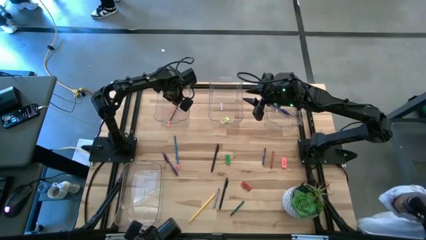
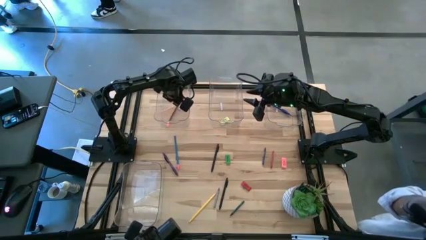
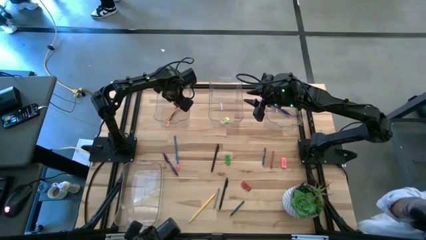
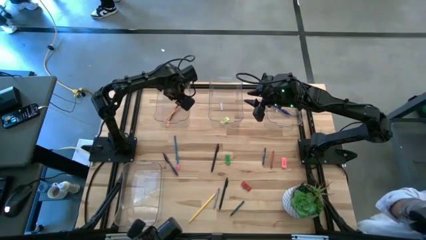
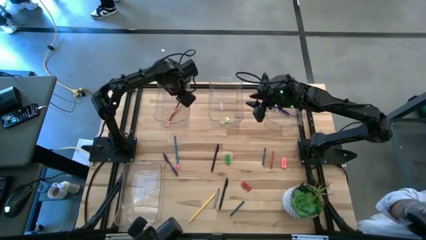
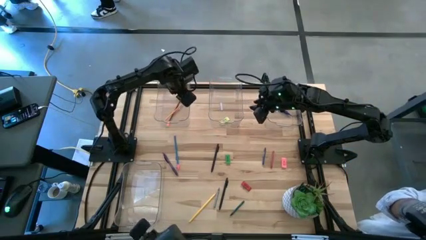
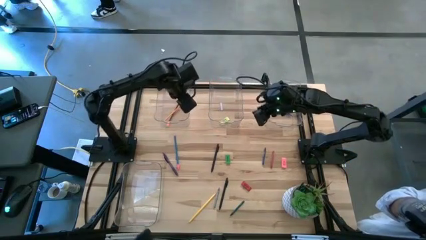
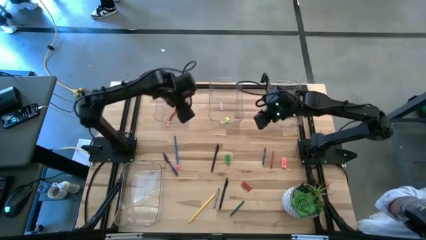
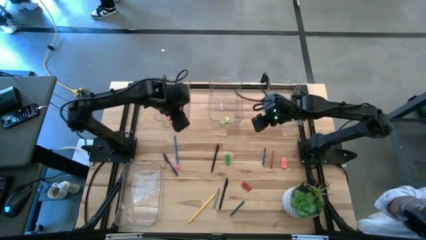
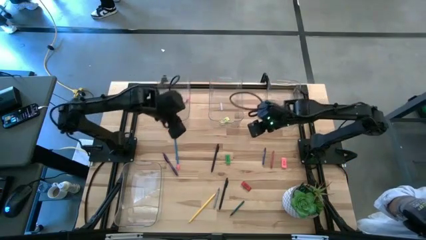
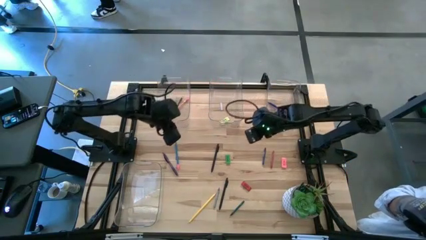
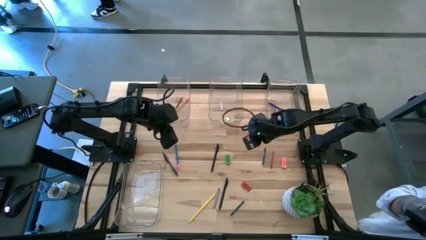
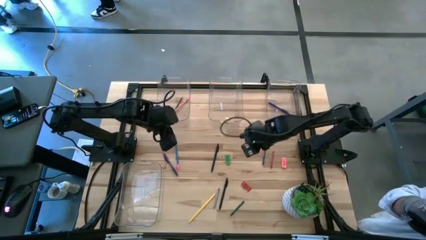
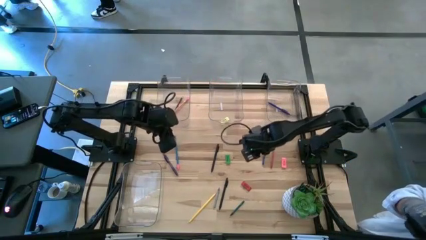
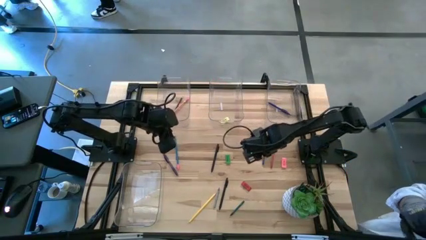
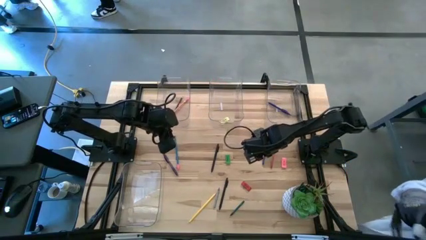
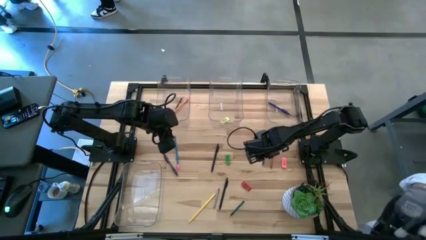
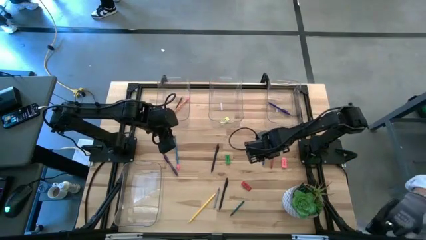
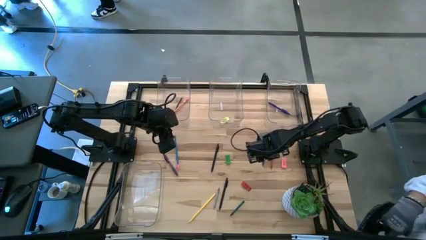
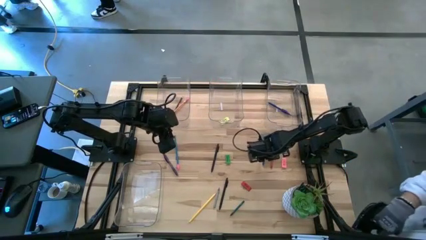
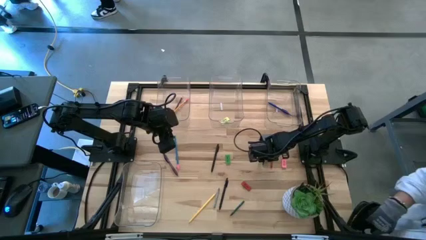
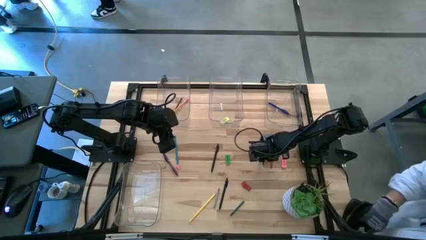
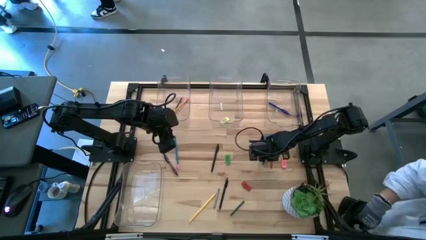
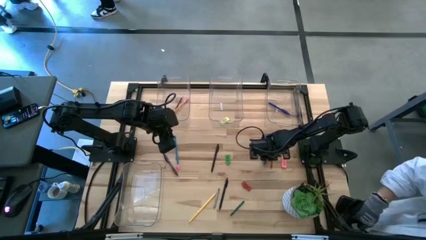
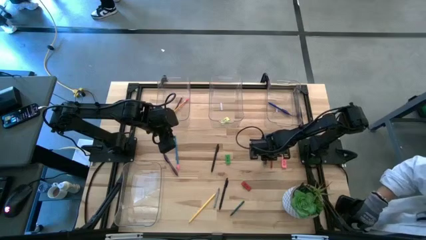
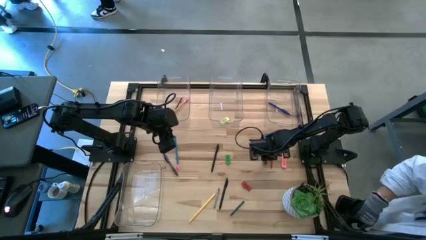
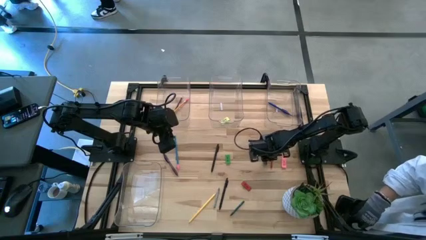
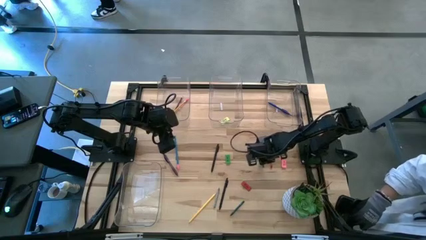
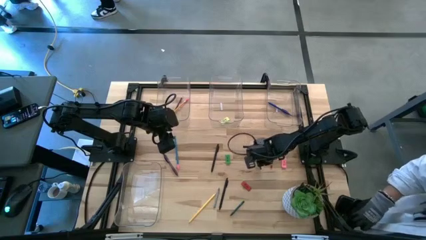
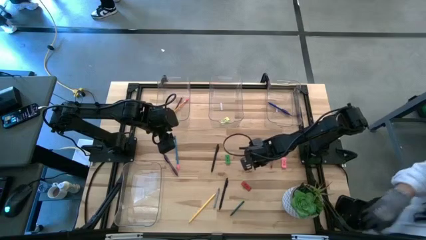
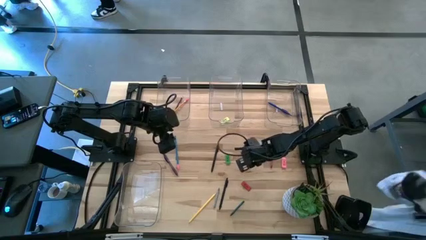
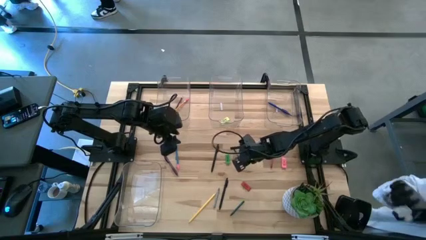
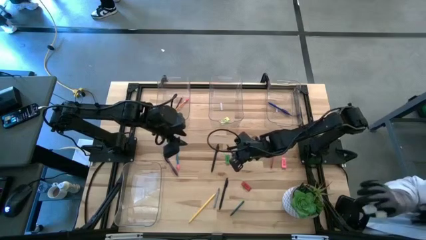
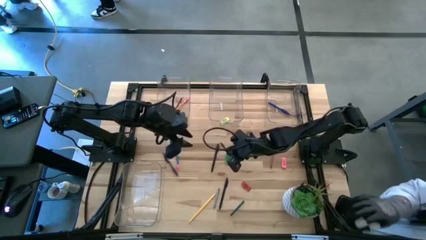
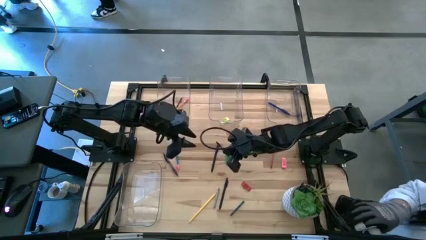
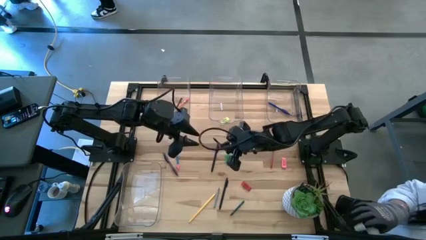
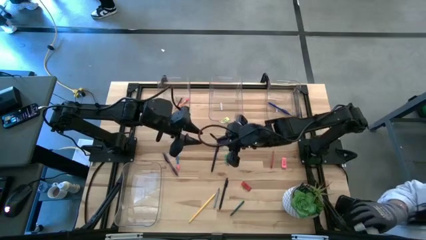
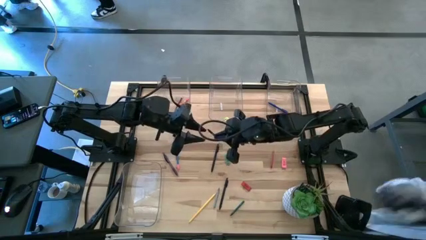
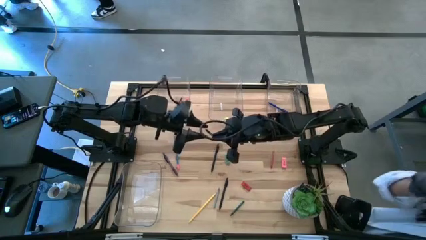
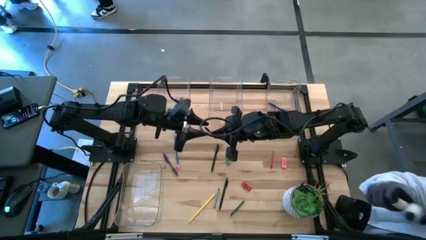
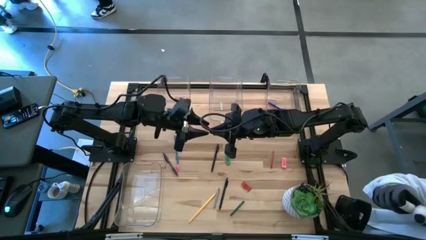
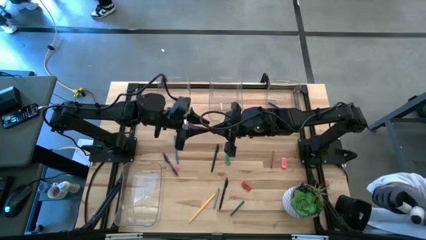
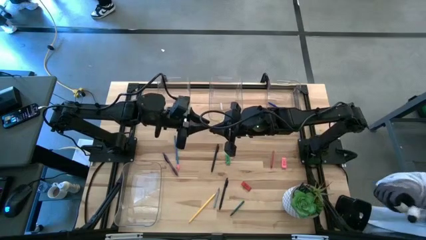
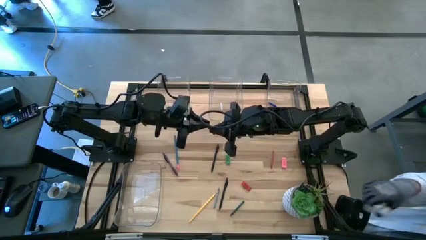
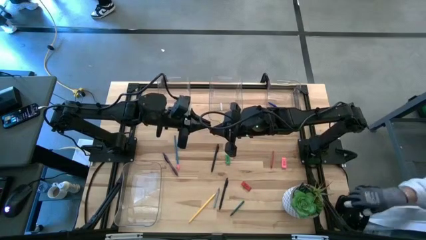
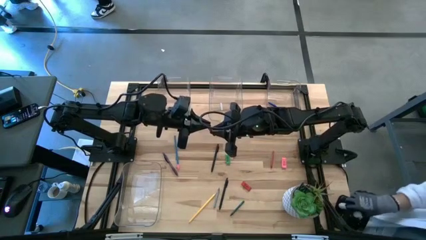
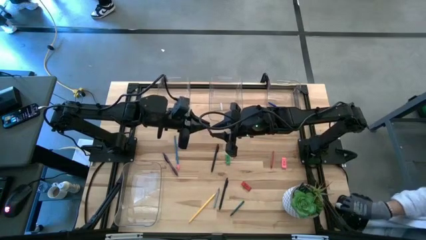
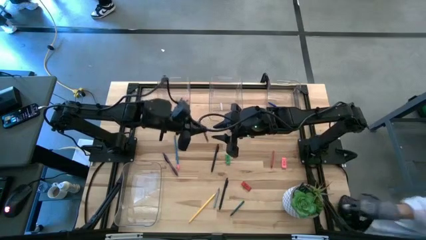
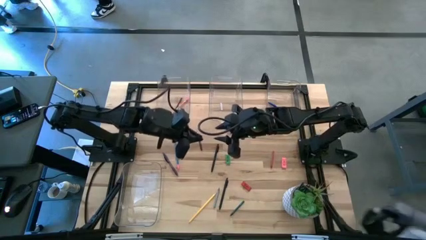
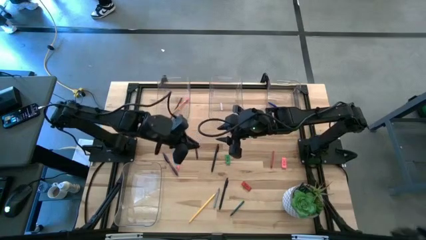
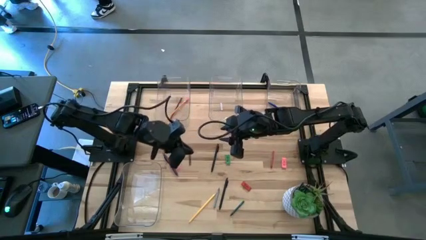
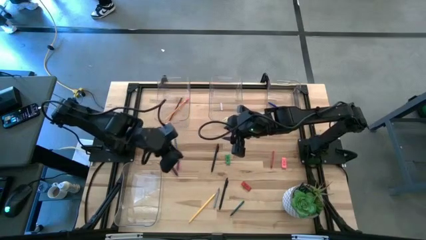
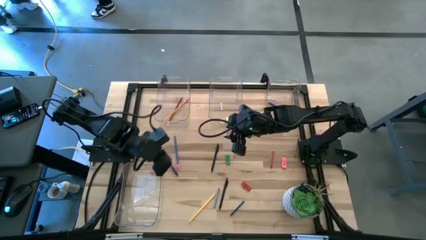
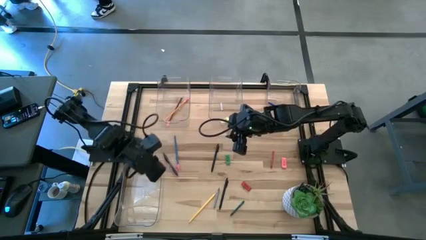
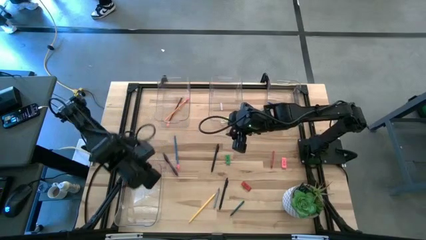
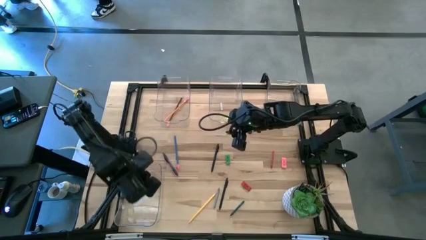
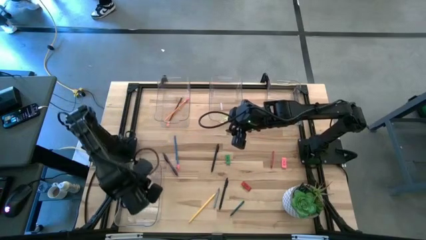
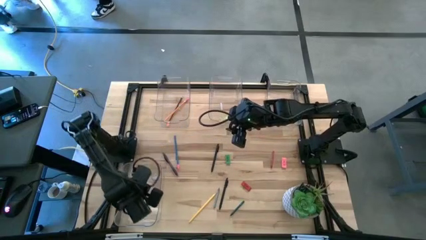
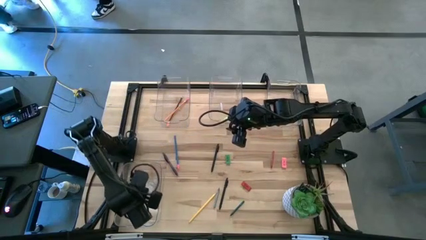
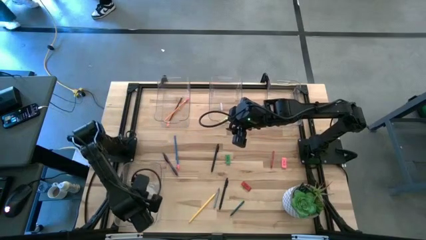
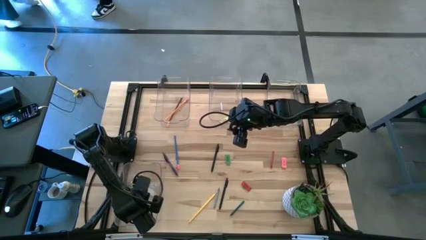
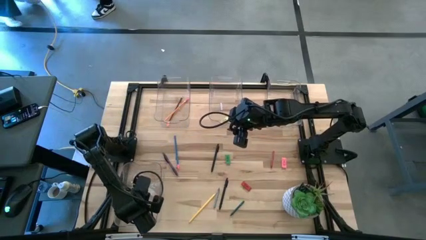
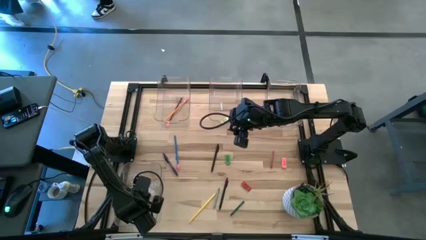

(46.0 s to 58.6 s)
Task: Sort crayons/erasers/pens/pencils in bins
Put the blue crayon into the bottom transparent bin

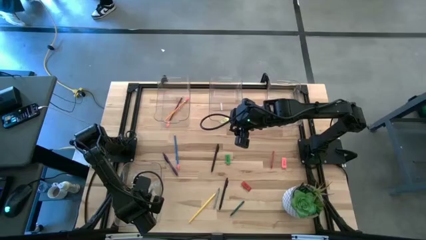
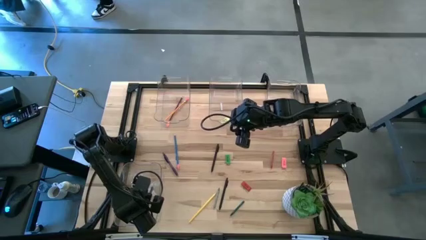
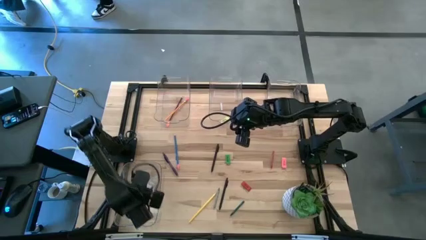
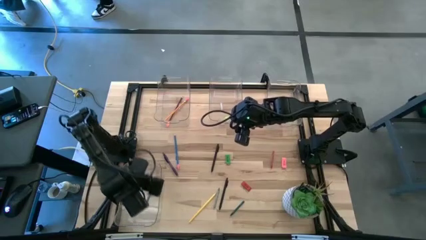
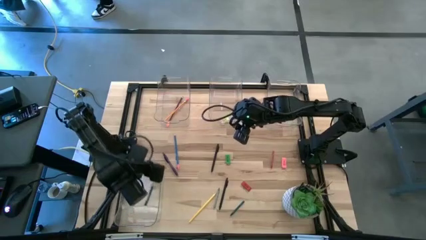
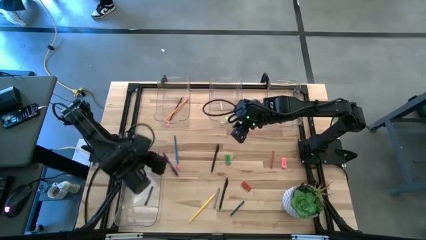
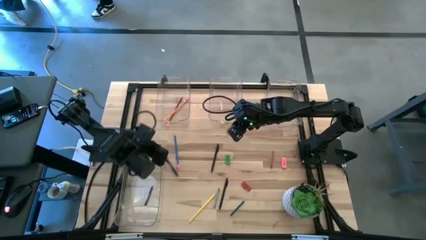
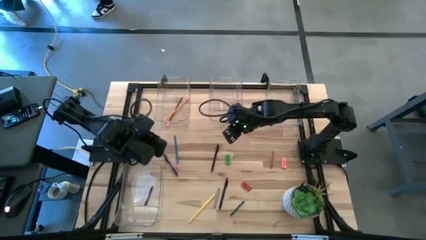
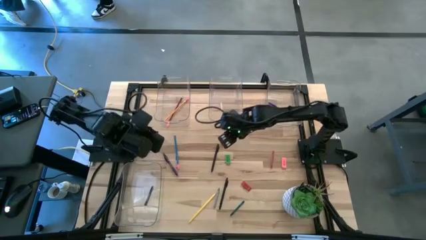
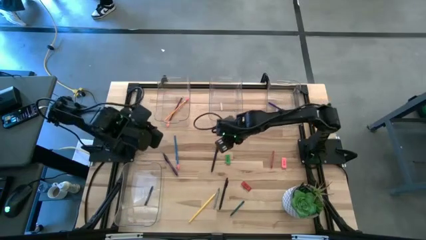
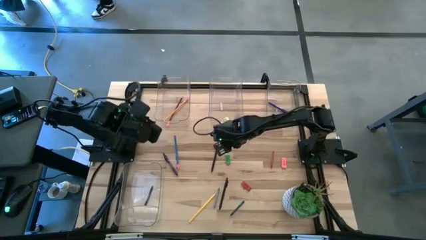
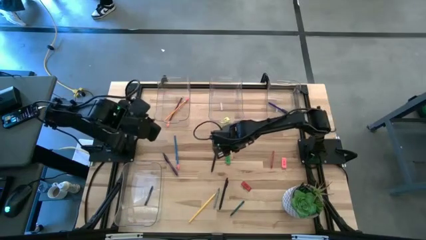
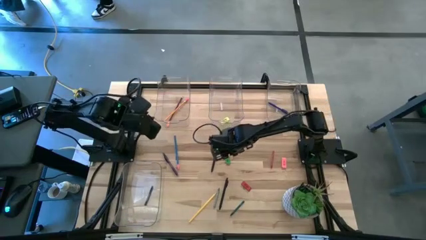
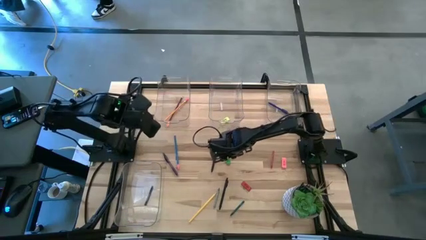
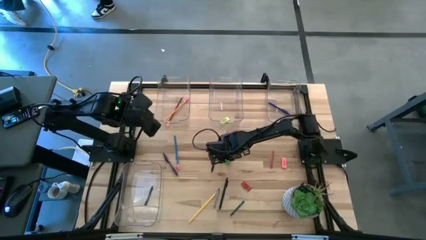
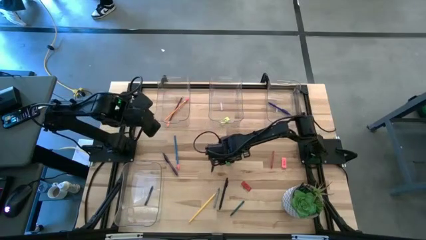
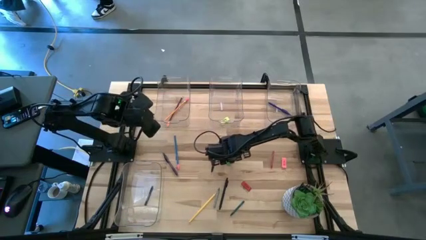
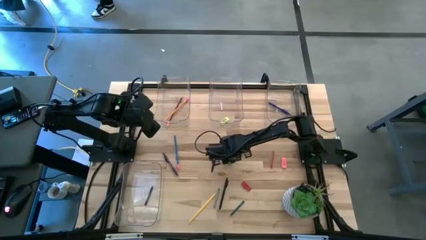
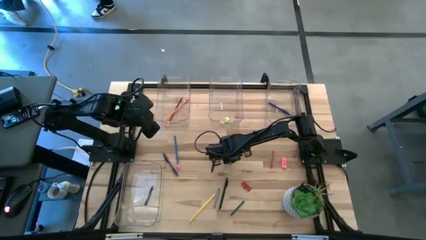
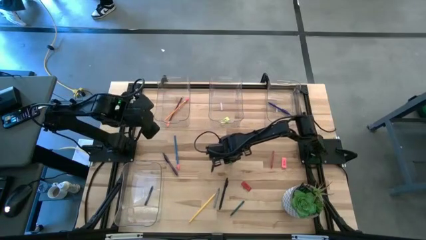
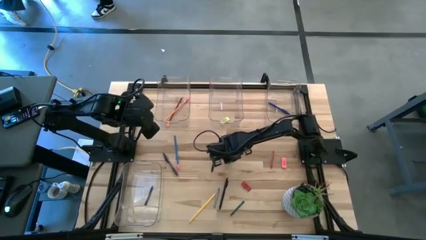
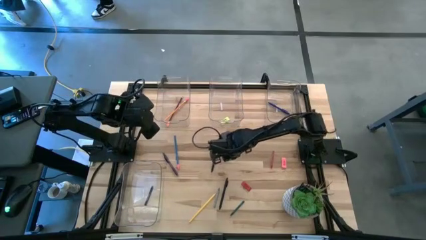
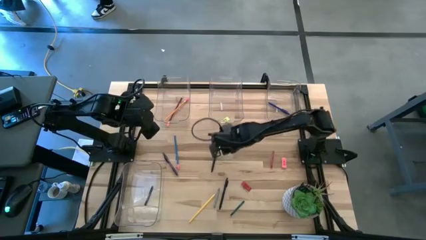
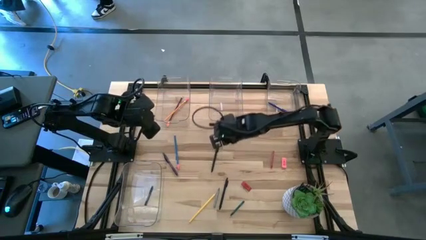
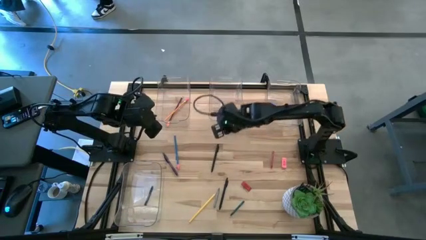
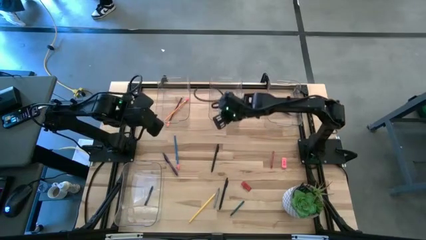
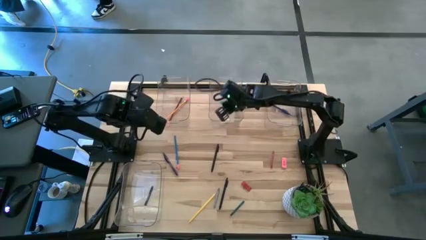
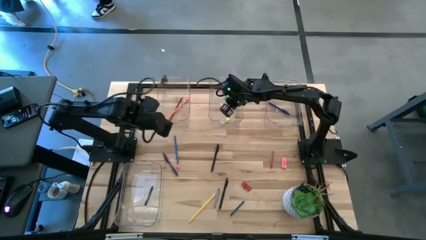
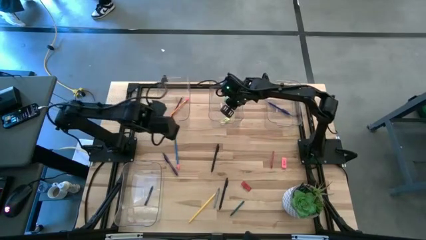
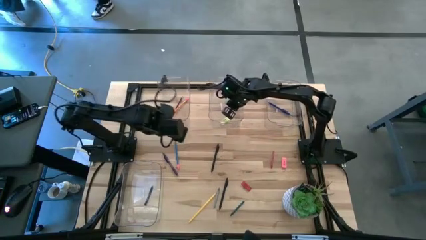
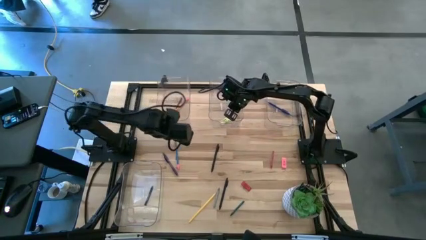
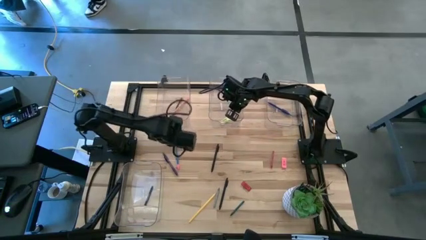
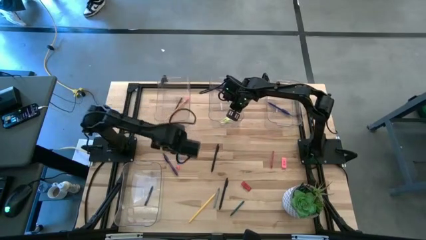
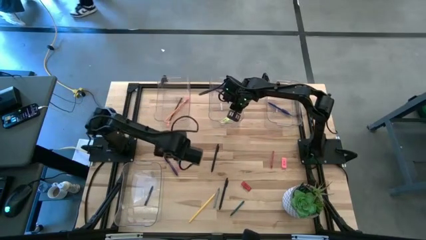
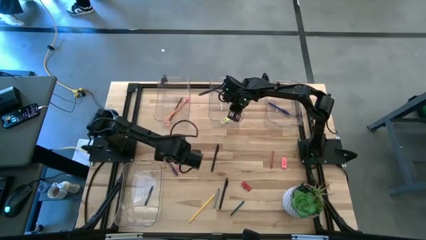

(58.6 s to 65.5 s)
Put the green eraser into the top middle transparent bin
